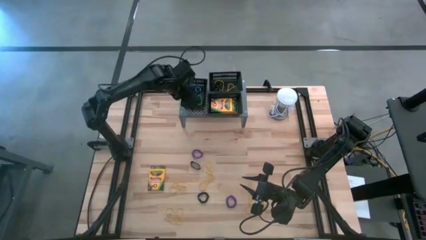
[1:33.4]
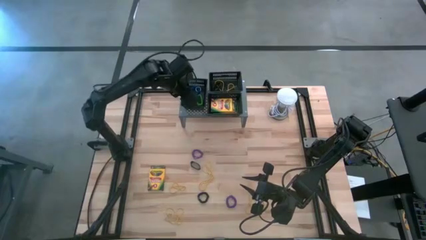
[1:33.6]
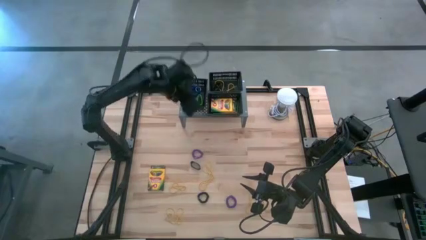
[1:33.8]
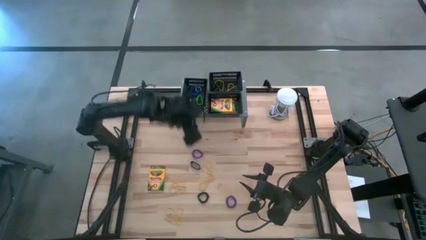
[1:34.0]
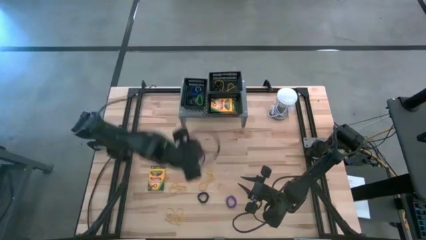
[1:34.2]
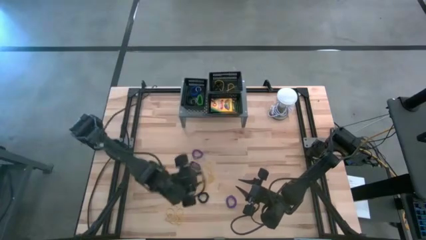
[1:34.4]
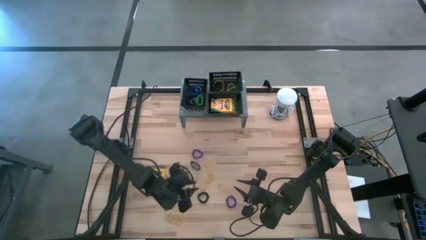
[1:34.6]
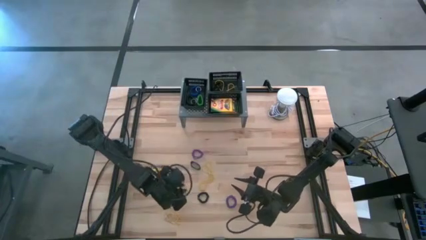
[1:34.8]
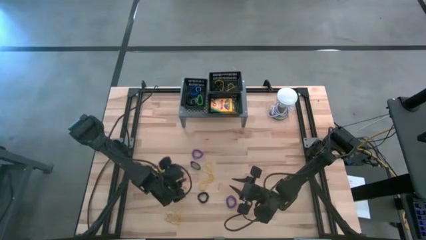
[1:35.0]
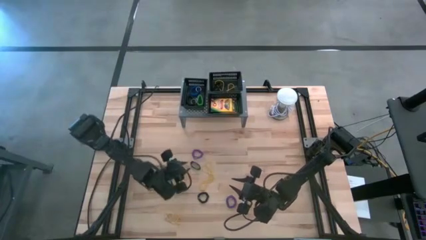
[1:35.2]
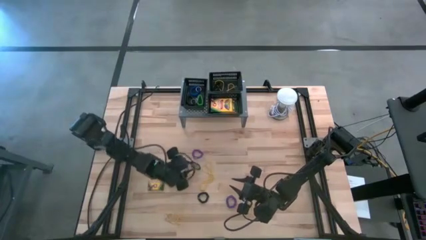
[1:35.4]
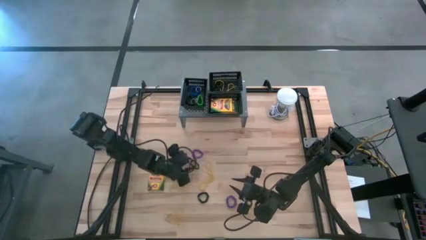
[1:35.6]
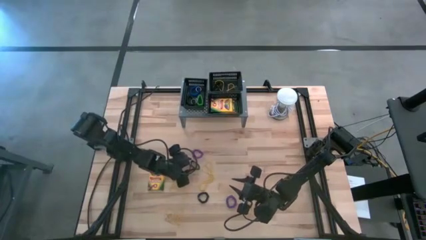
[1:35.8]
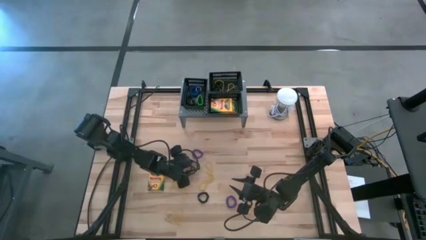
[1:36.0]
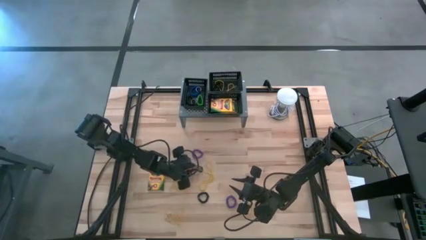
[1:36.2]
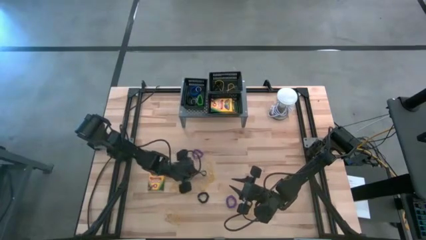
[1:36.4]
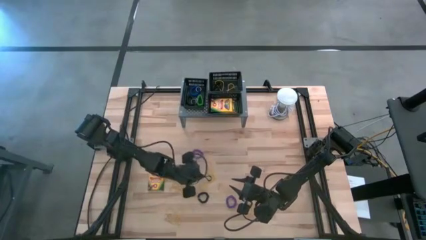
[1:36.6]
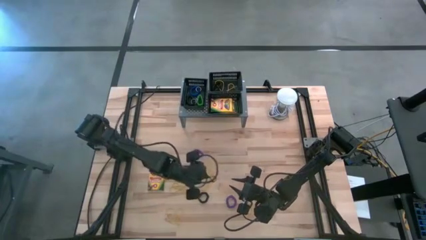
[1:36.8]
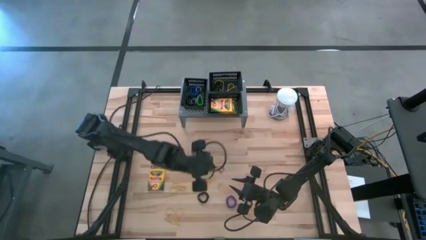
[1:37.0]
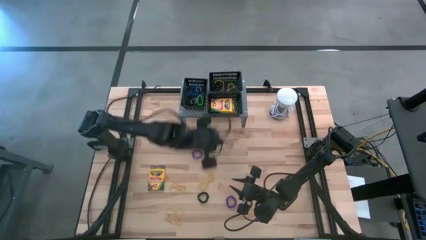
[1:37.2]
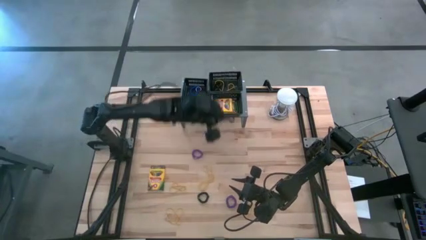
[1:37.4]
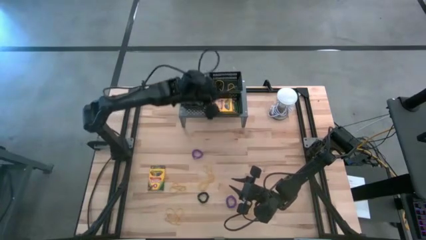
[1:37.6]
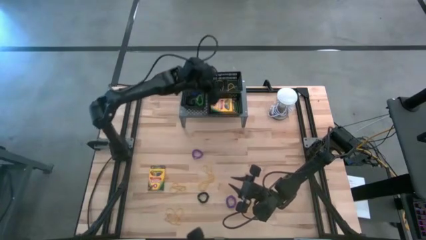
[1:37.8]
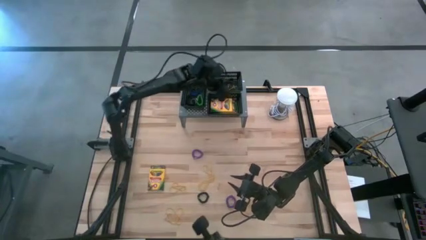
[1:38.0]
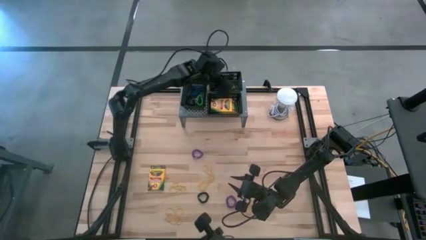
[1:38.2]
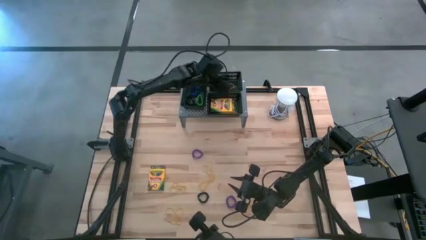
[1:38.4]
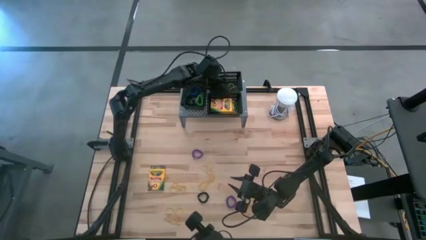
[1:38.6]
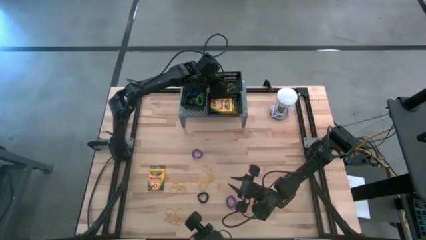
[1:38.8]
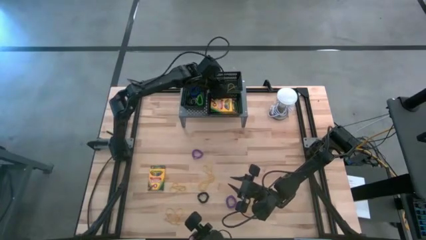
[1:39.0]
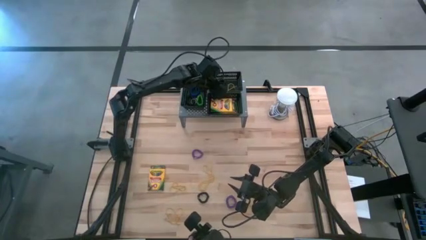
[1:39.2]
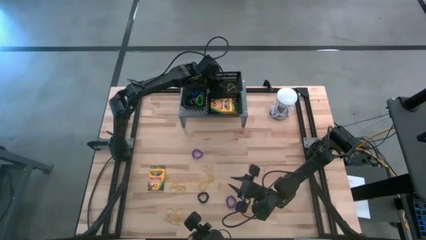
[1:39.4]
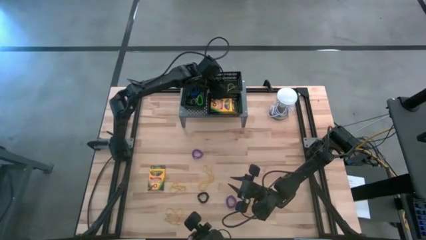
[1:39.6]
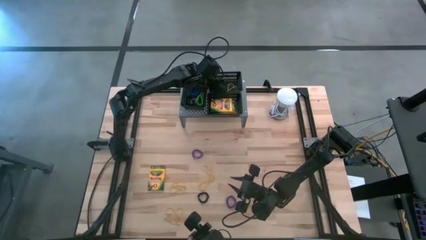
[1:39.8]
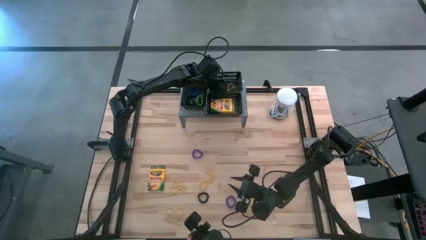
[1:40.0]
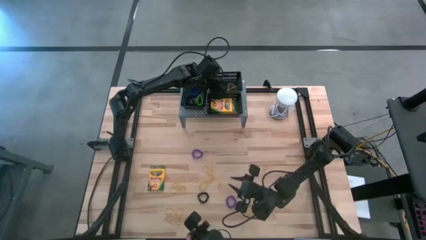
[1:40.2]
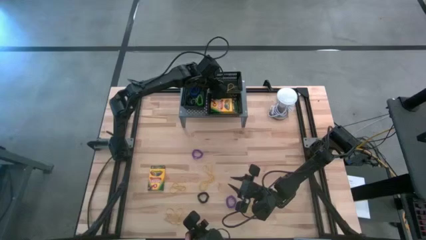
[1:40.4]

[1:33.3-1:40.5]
Task: Pick & Place Office Desk Supplies
Put the black rubber band into the top black bin on the shelf

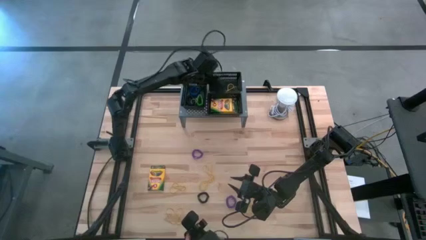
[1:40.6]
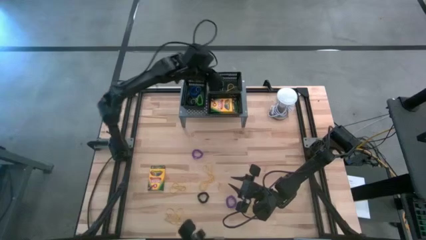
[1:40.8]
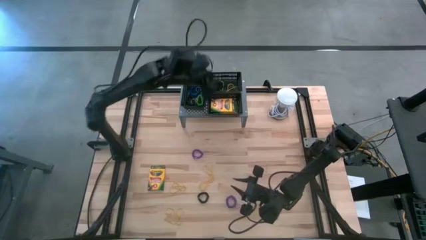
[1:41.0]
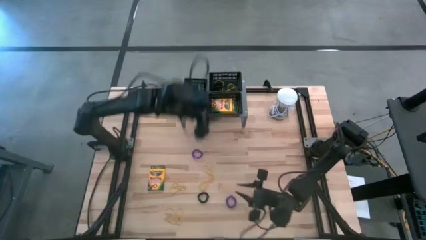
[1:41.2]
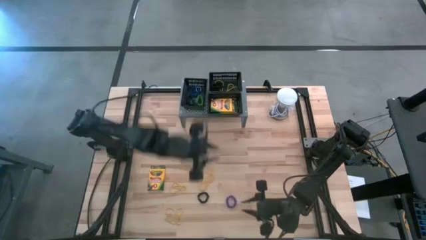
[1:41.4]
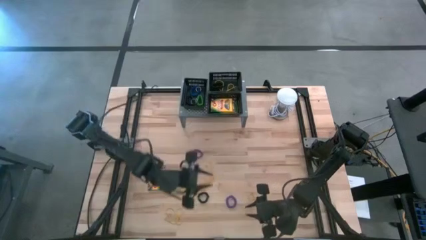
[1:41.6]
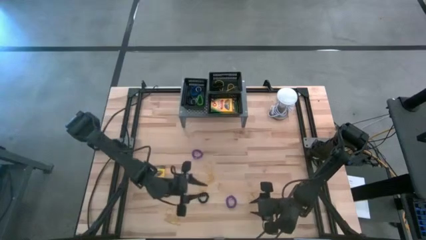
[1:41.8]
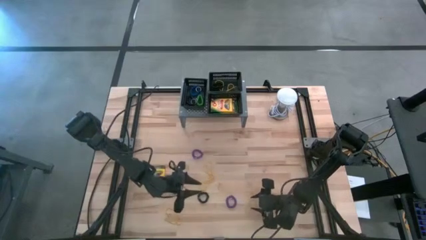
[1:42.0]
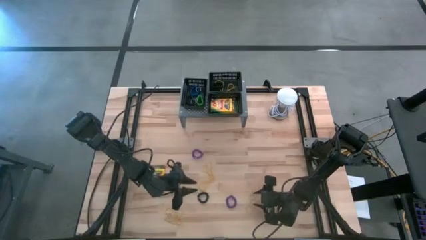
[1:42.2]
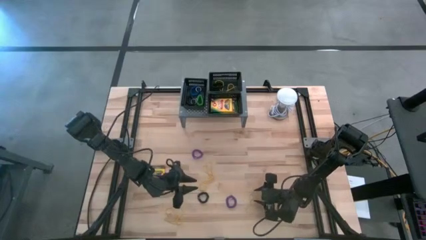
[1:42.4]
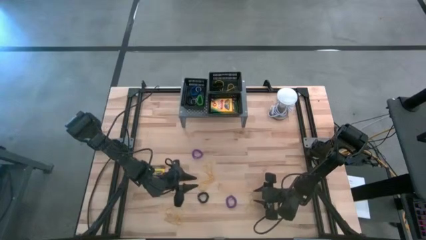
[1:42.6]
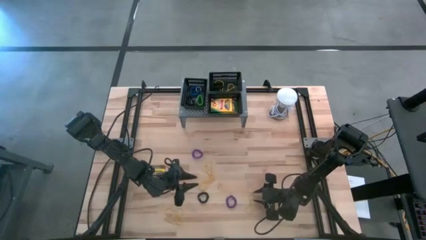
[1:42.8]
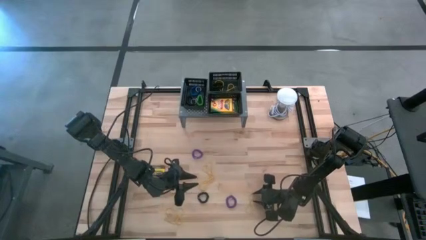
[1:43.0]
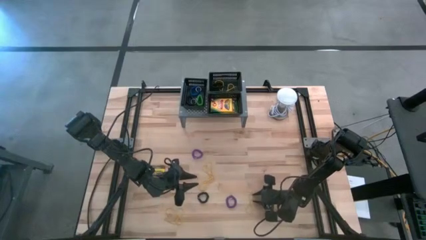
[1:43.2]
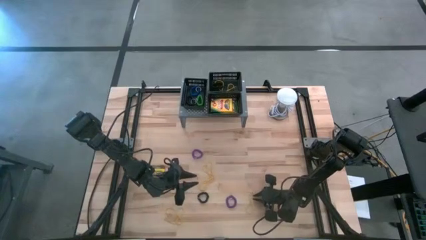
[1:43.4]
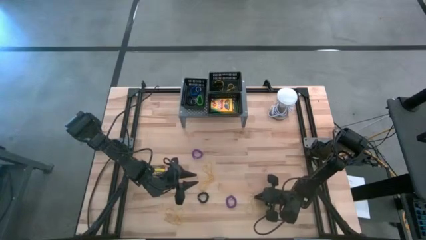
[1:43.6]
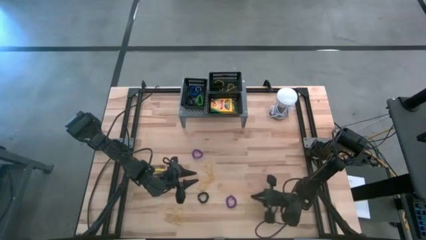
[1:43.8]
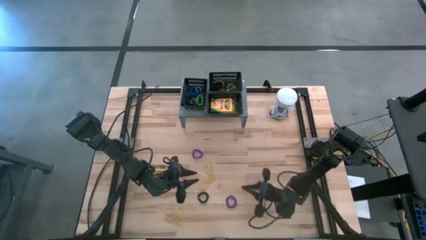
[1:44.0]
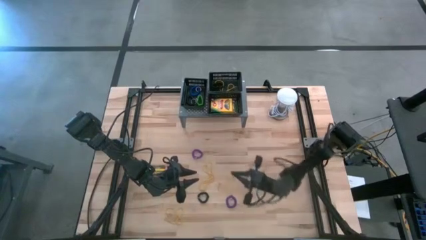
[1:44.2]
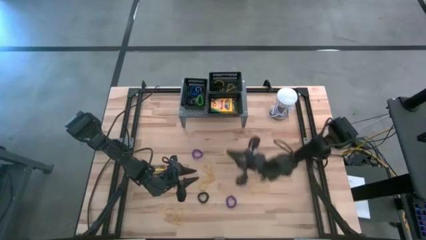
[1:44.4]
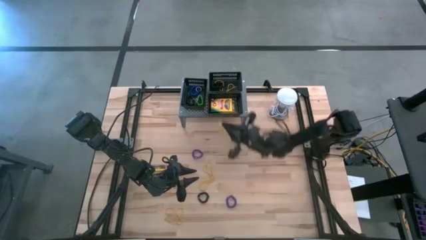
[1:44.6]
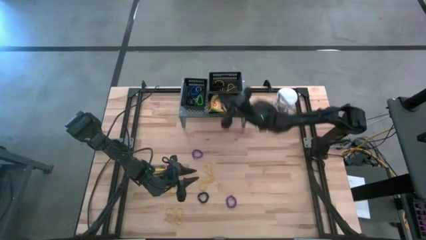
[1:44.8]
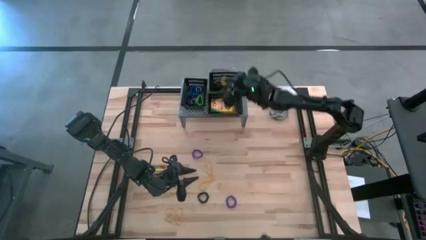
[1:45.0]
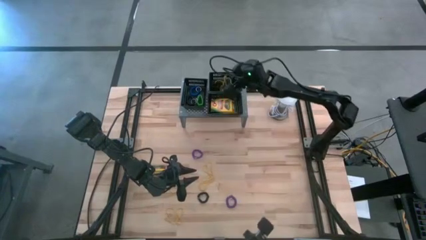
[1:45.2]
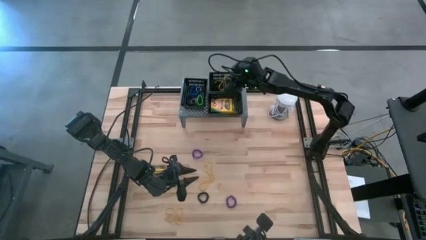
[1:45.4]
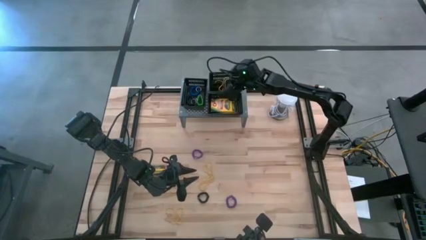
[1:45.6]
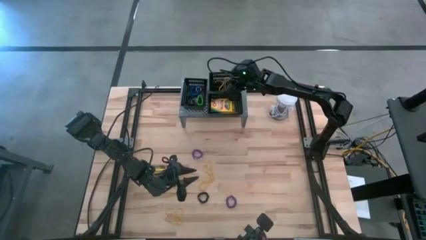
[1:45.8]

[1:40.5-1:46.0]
Put the yellow rubber band into the top black bin on the shelf

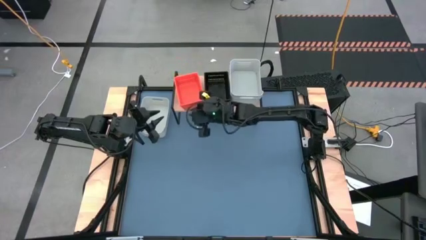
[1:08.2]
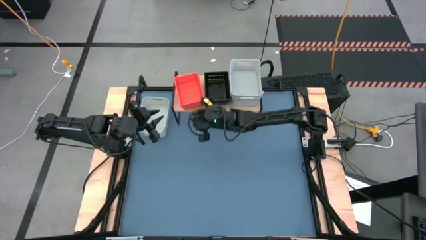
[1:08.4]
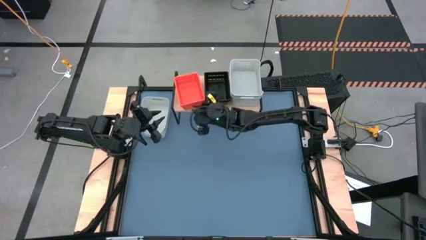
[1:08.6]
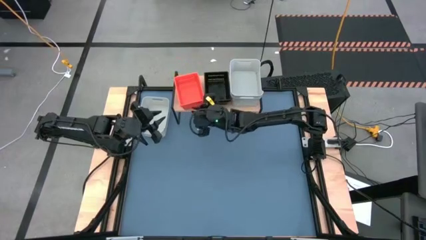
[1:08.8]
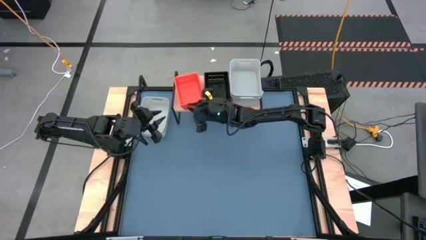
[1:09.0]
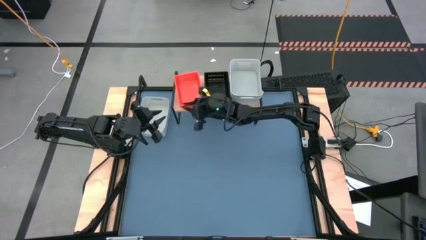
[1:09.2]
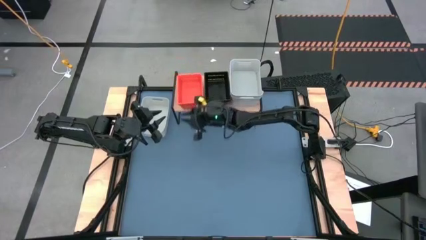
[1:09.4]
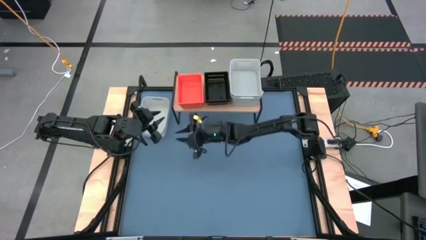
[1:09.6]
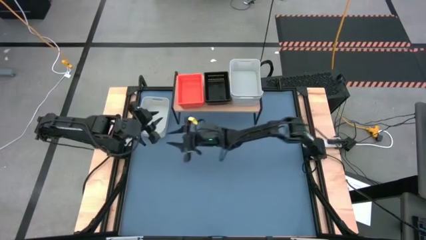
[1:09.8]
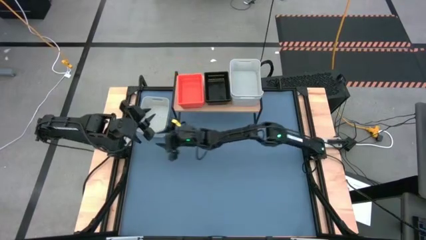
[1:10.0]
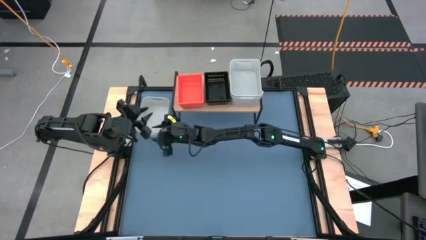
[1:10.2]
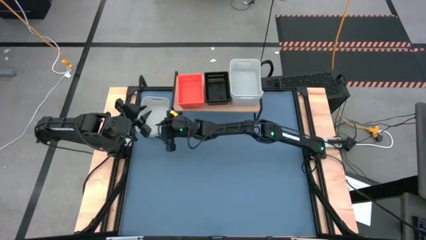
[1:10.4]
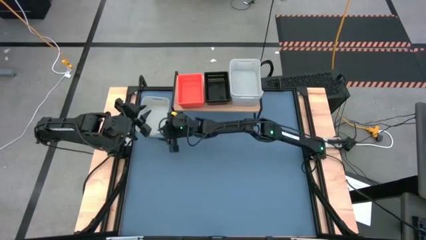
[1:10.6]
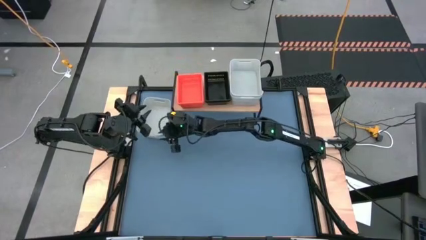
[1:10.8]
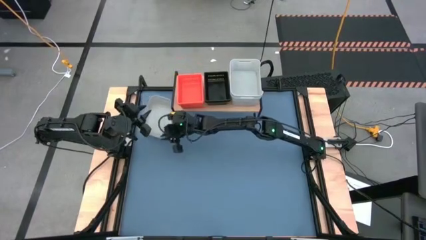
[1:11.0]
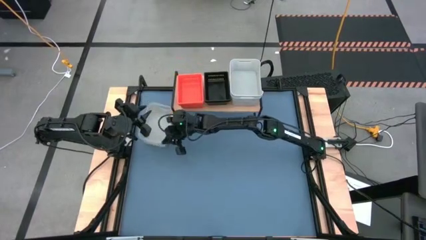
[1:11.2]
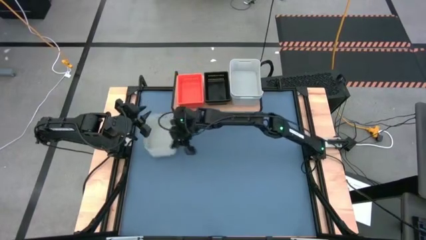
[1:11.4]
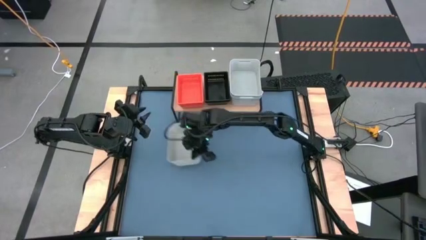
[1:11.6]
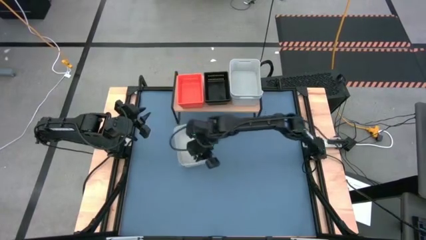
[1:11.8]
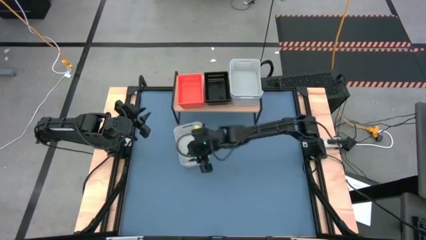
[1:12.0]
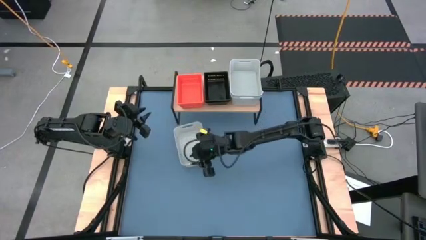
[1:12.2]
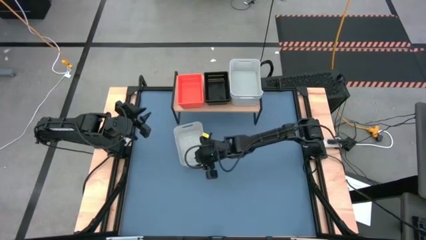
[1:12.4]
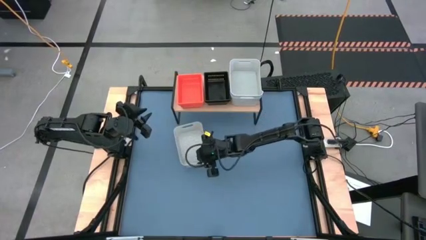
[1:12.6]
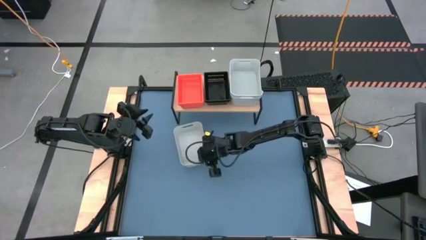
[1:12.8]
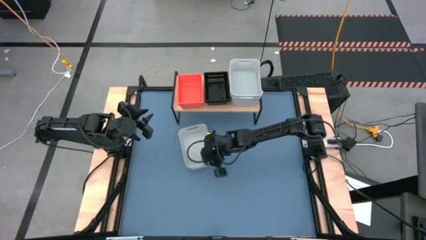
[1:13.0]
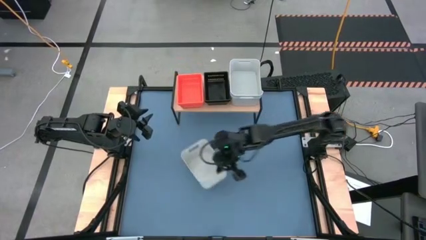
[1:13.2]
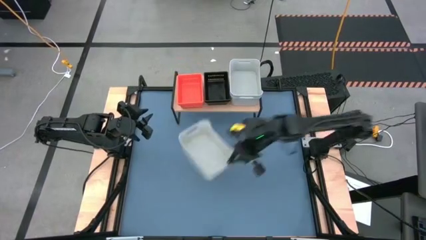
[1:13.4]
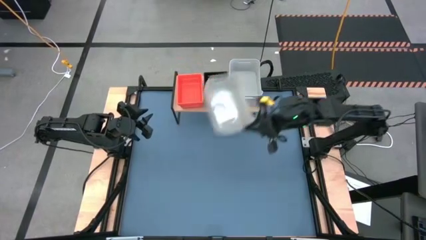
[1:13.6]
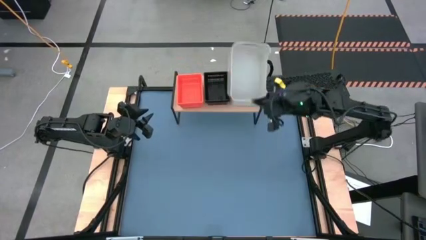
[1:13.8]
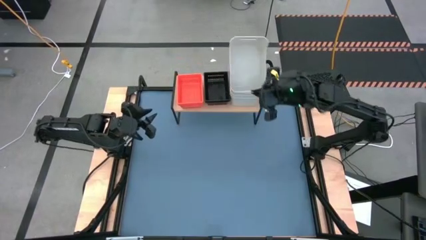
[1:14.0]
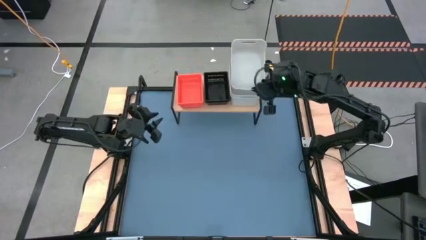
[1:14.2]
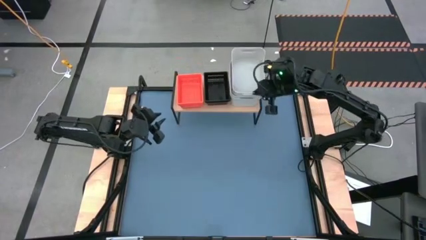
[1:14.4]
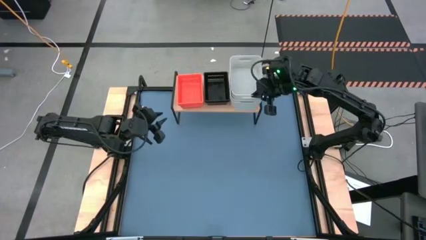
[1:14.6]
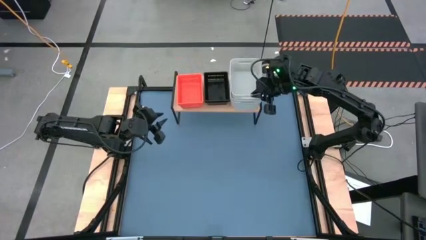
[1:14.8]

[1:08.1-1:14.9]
Task: Stack baskets on shelf by color
Stack the grey bin on top of the other grey bin on the shelf
